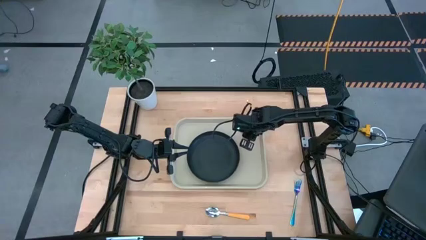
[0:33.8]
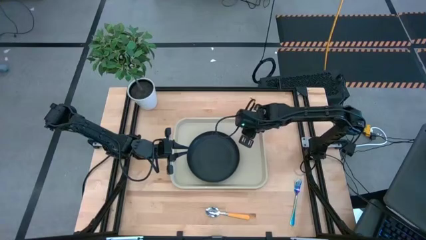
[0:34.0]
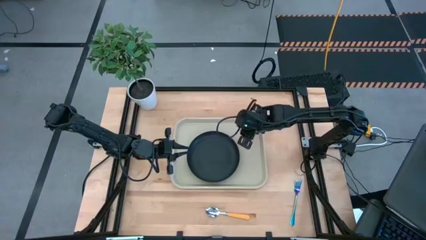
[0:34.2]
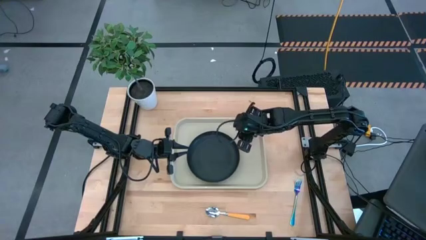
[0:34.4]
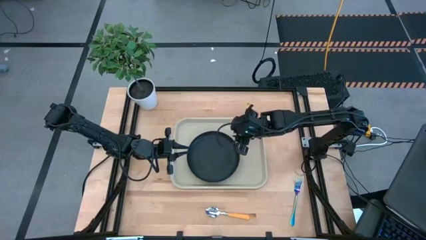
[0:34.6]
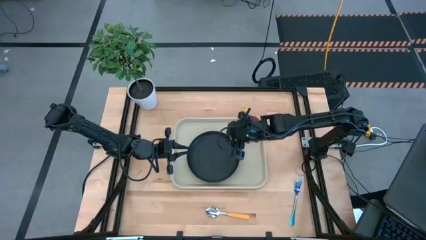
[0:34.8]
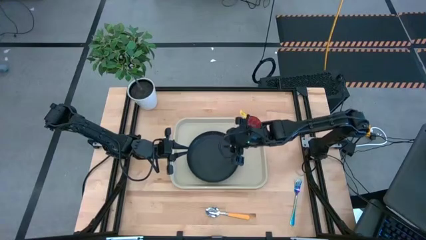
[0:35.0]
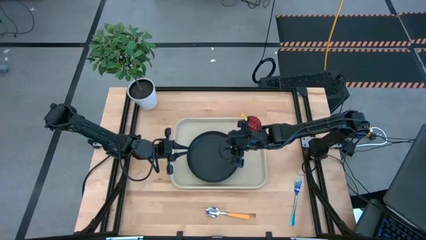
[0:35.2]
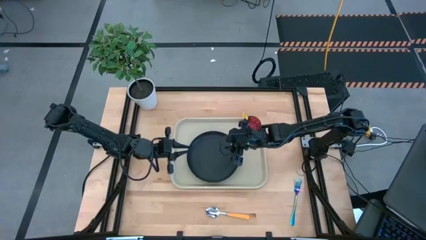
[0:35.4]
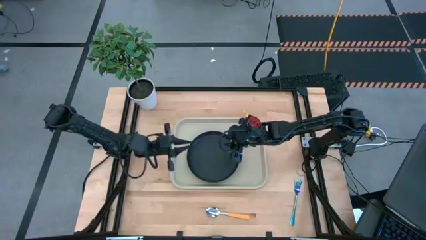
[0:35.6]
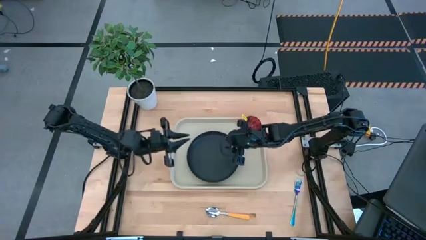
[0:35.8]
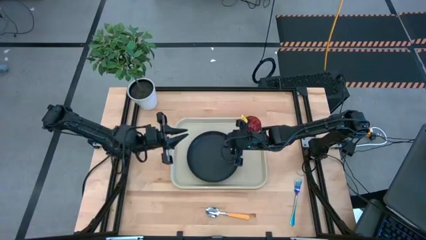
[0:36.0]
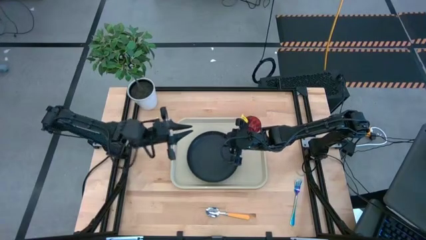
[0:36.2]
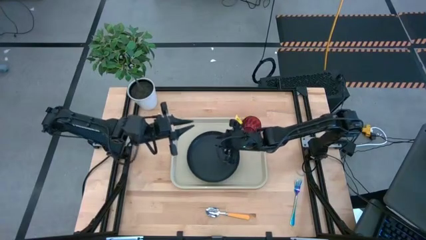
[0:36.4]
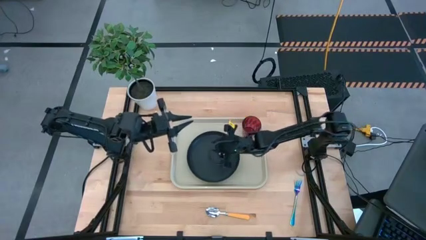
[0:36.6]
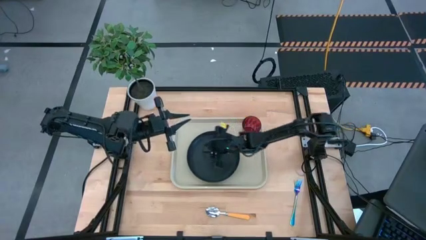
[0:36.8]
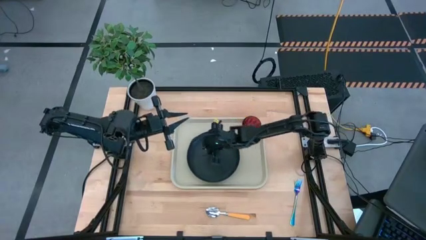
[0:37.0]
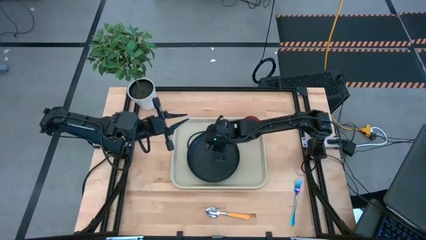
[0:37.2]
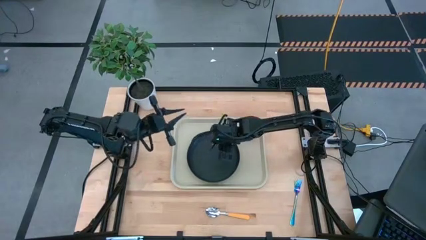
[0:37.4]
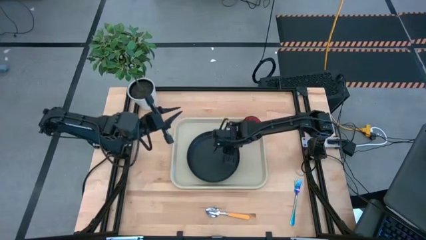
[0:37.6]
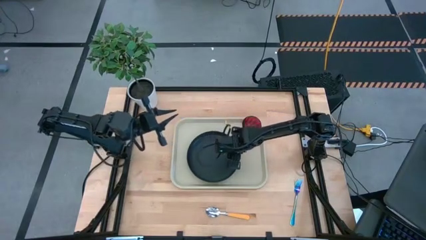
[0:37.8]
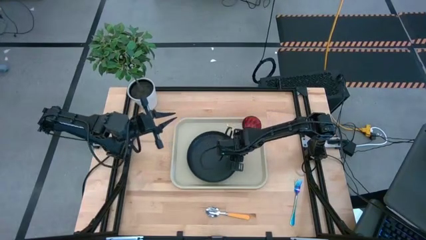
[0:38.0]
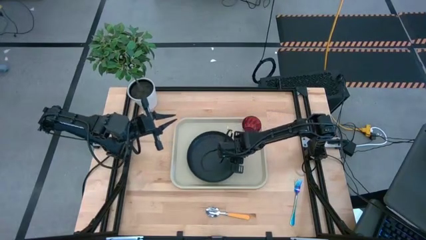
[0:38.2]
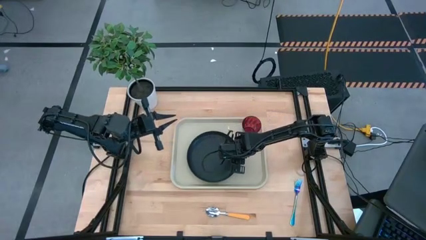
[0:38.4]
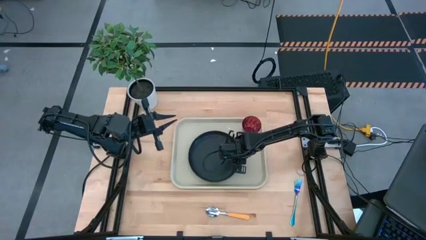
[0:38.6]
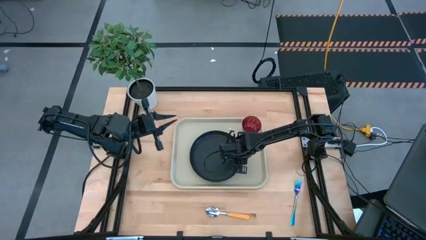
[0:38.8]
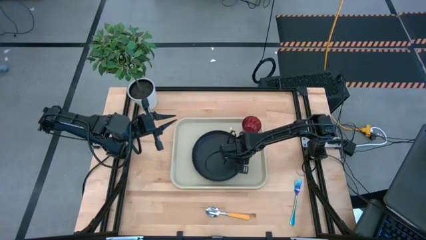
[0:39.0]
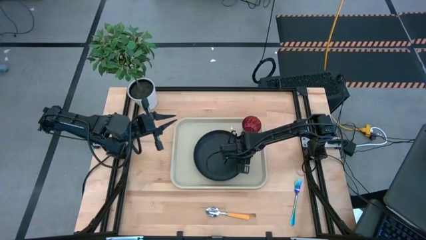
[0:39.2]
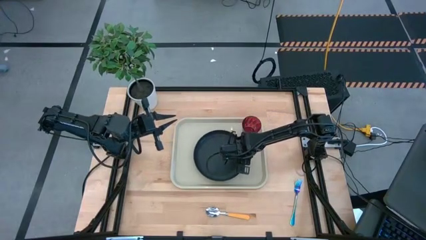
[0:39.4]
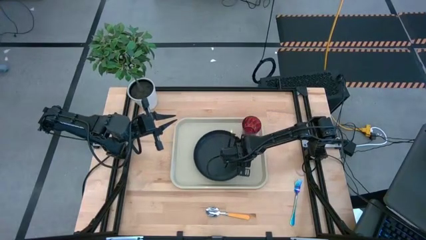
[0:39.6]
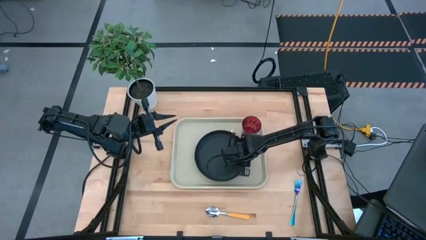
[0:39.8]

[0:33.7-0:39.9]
Task: Pick and place plate/cup/fork/spoon on tray
Adjust the black plate

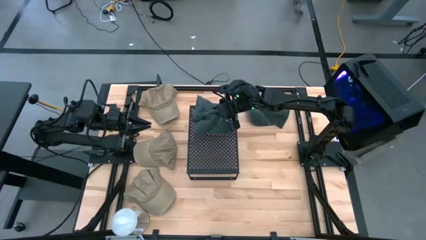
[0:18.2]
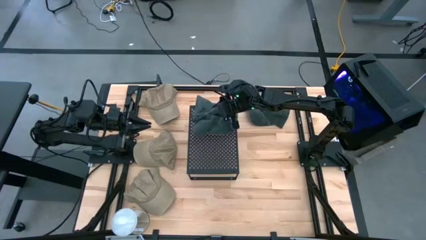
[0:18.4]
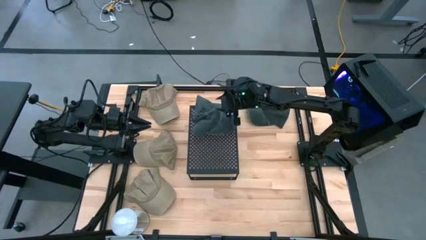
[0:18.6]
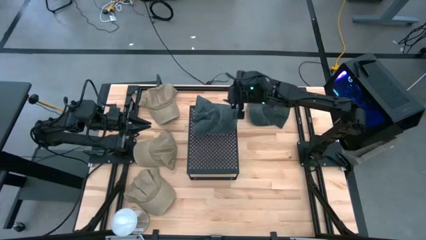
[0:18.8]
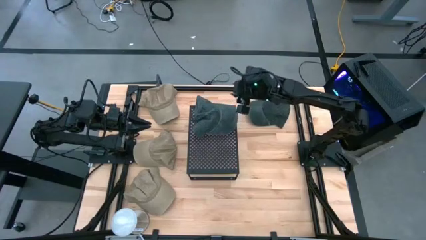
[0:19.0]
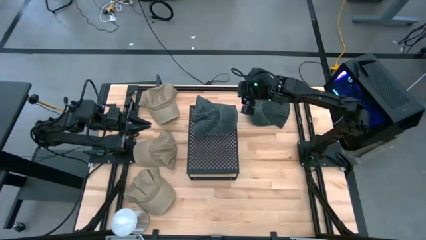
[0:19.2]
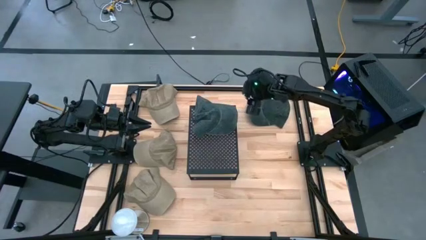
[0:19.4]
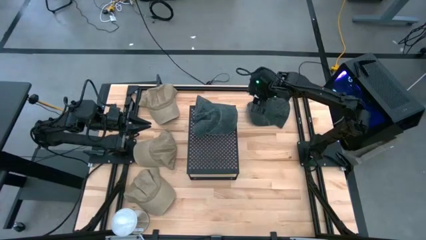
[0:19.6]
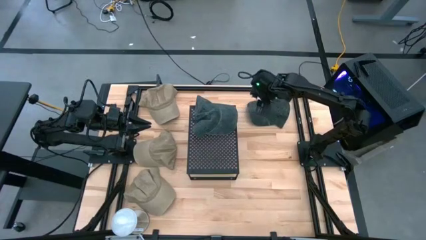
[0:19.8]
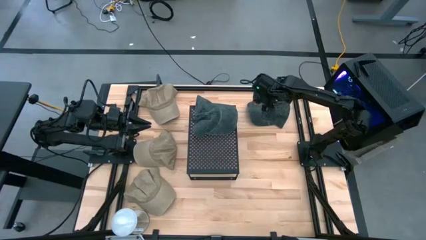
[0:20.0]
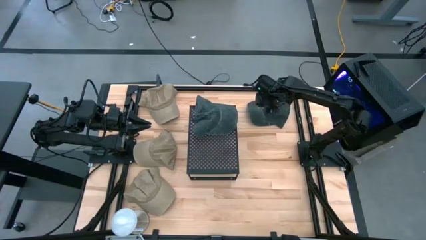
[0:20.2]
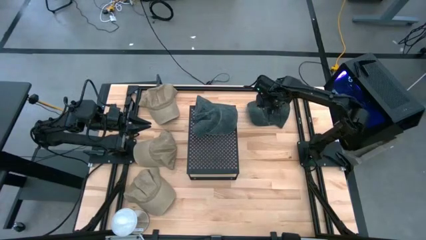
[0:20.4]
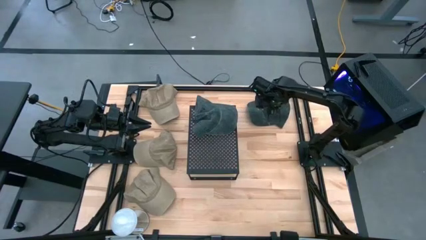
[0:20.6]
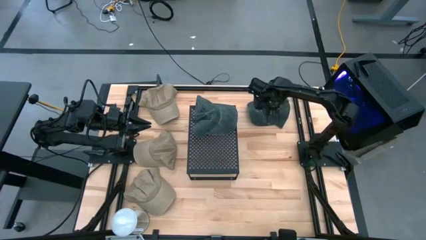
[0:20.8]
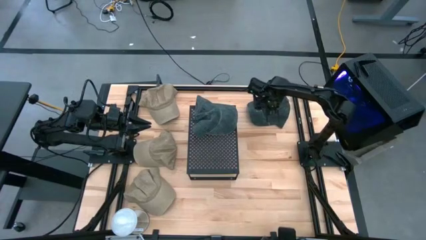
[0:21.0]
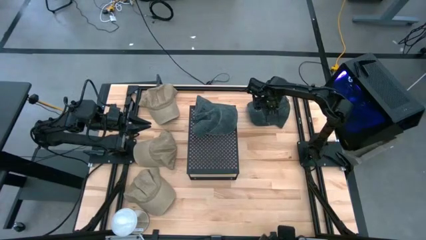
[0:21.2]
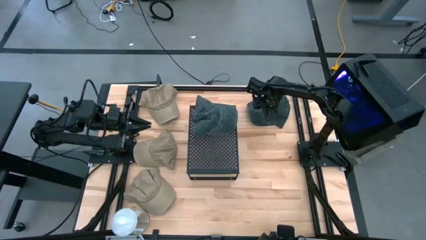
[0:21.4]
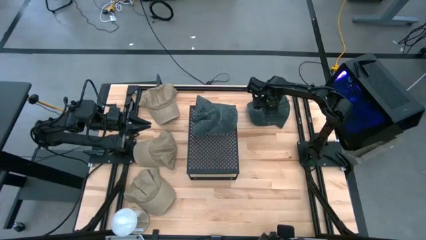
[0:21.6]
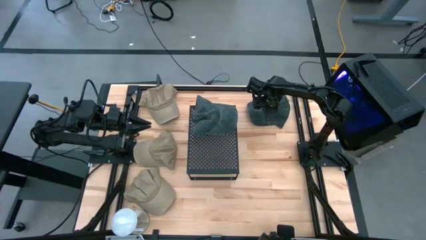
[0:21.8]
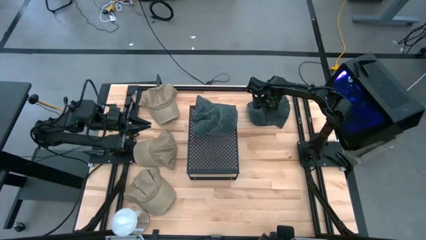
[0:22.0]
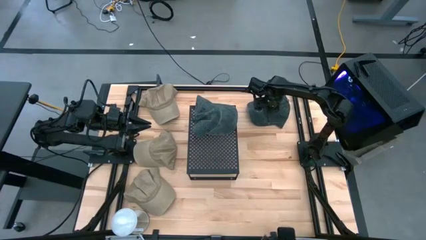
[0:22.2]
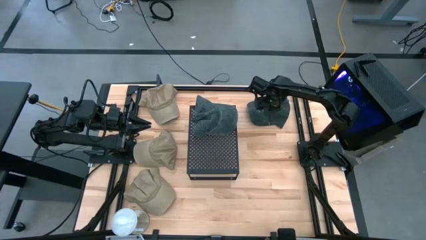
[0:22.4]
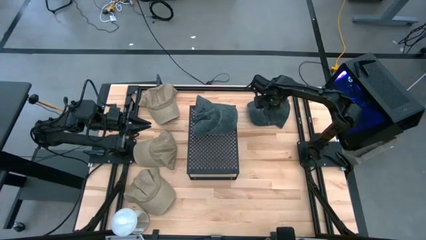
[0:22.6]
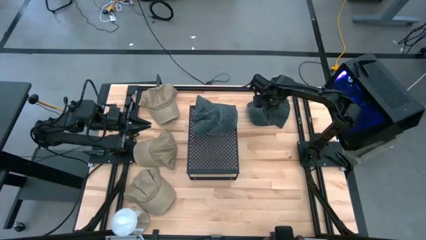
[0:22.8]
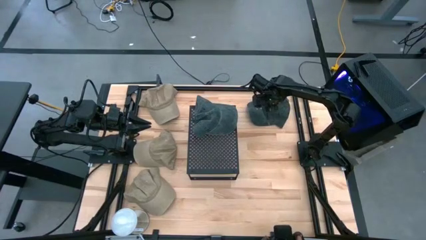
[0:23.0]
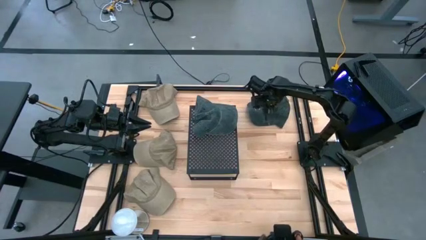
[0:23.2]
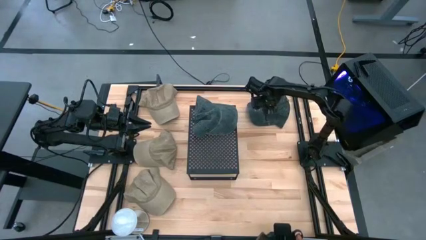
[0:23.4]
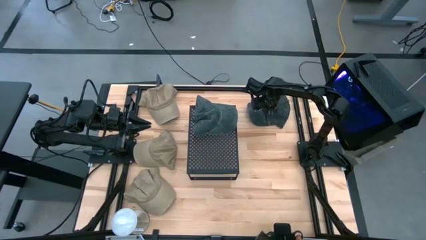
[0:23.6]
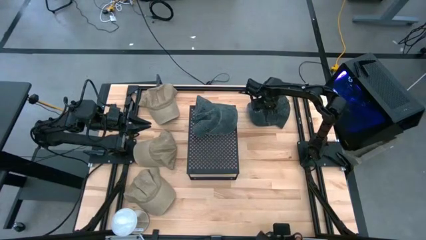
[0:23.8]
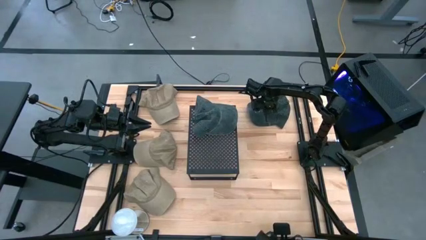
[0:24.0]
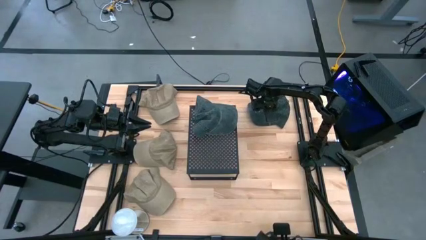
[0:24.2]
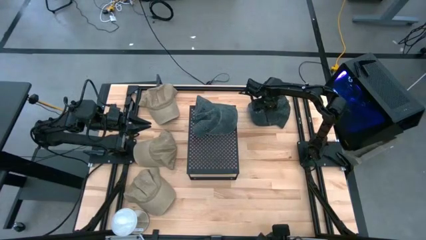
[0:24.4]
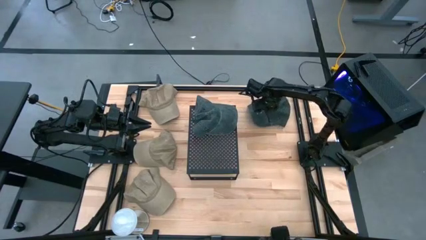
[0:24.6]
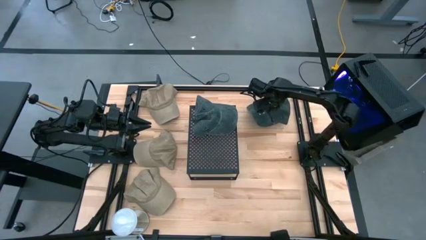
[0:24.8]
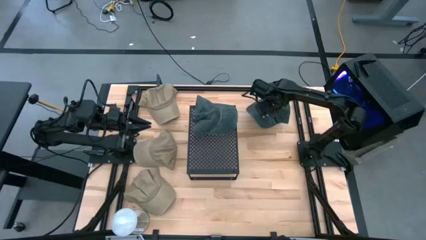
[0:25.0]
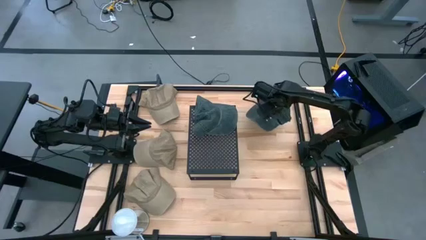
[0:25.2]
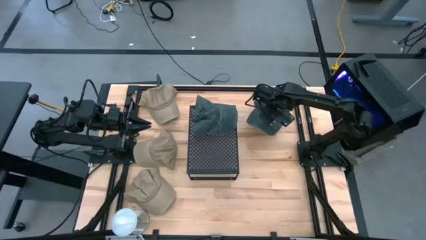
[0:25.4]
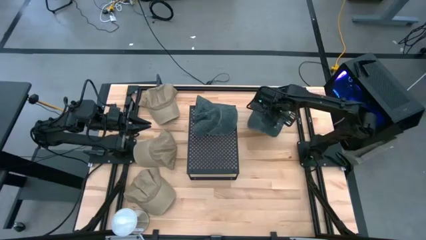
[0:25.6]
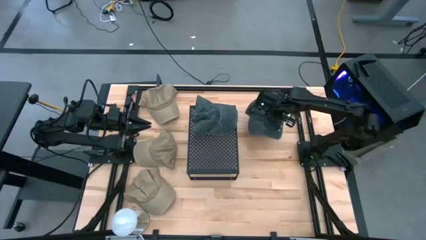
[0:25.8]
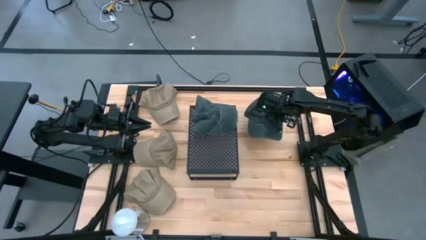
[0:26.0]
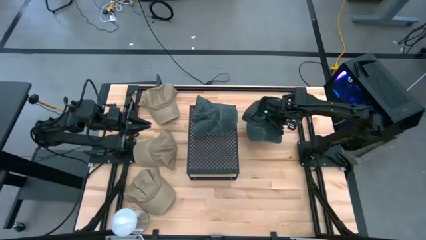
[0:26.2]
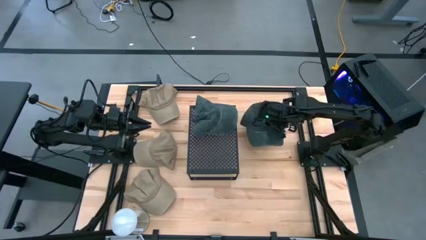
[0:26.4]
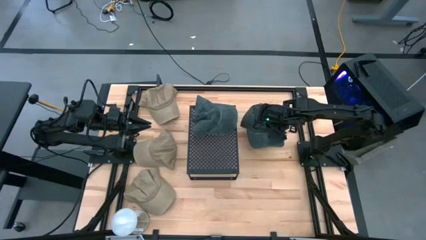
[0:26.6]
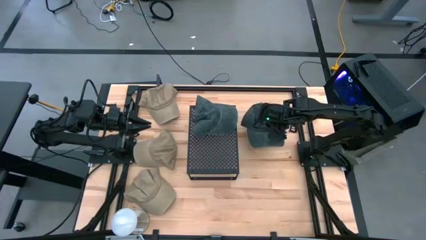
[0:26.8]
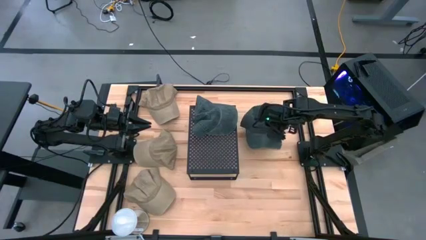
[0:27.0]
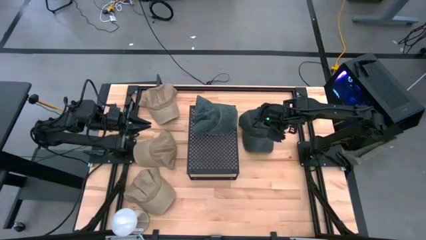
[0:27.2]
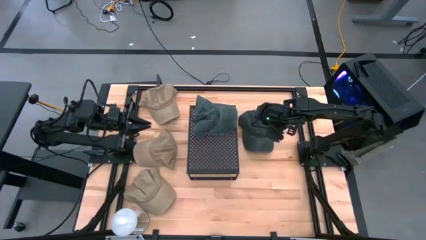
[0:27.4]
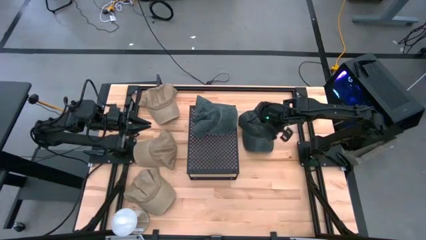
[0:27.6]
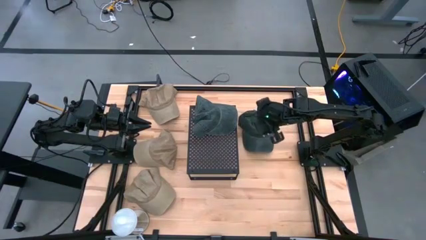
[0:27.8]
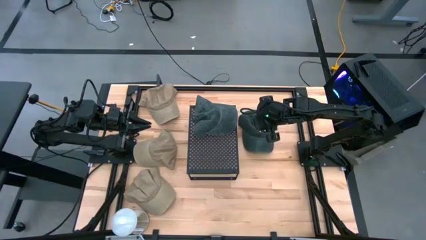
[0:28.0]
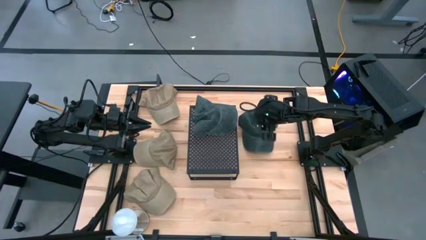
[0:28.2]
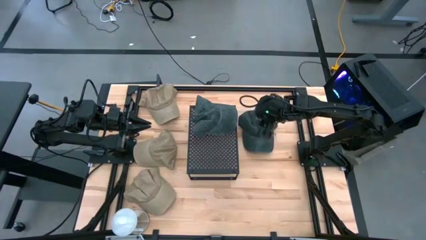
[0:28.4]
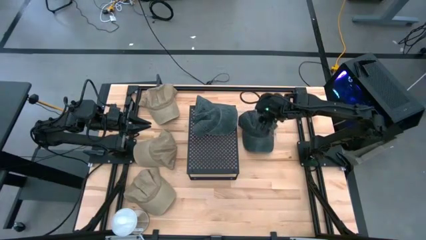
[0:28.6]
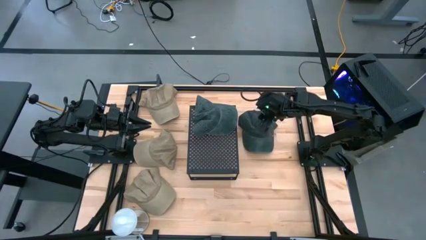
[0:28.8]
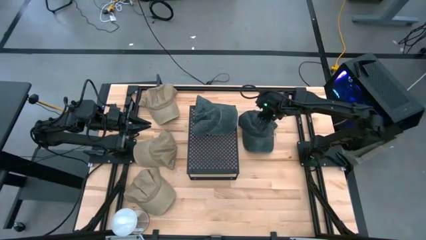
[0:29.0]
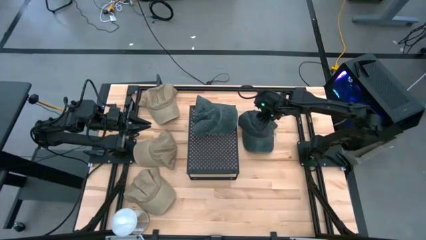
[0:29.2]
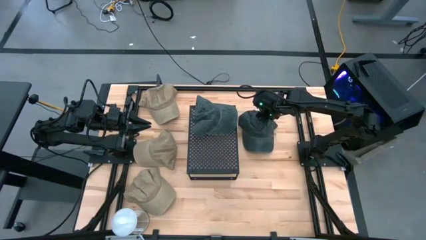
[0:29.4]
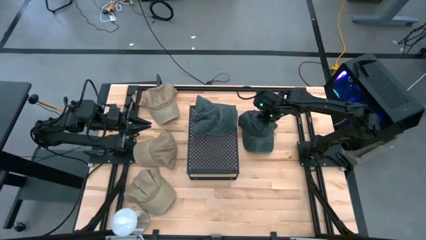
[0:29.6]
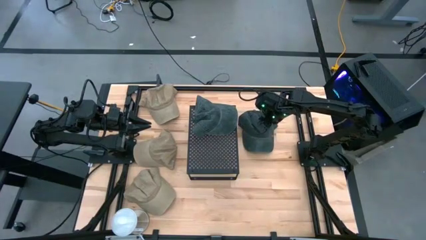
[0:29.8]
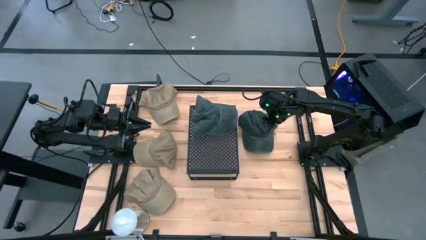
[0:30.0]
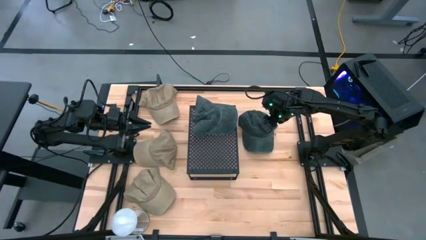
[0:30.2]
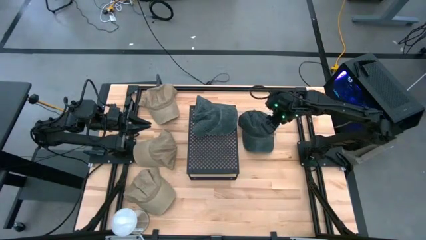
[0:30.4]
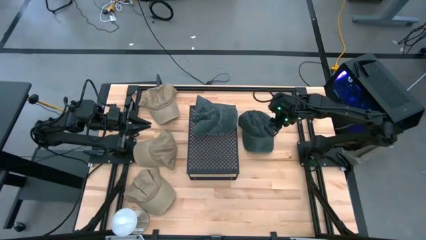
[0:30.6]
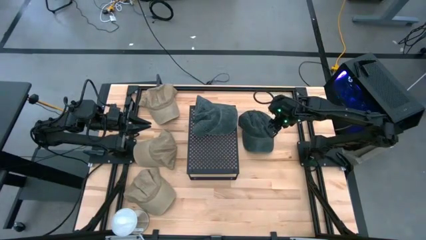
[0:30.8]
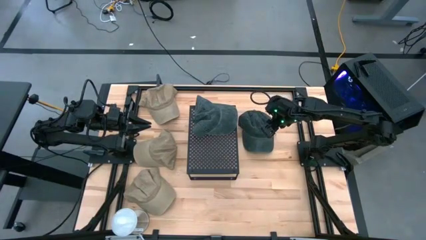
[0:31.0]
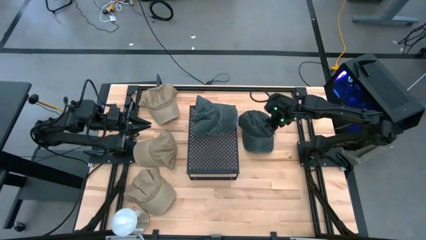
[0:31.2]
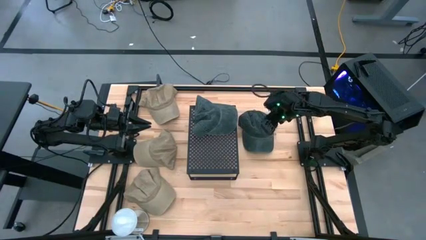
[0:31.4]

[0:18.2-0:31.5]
Task: Pick & Place hat
Stack the gray cap on top of the other gray cap on the shelf
